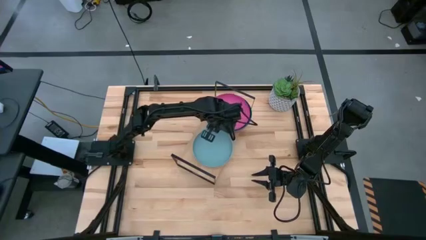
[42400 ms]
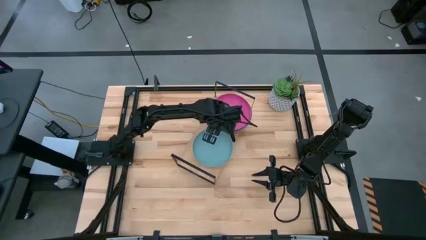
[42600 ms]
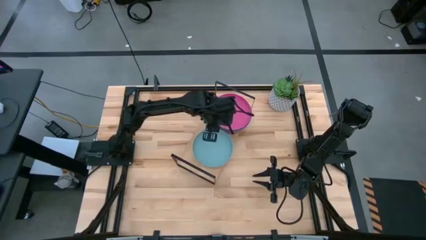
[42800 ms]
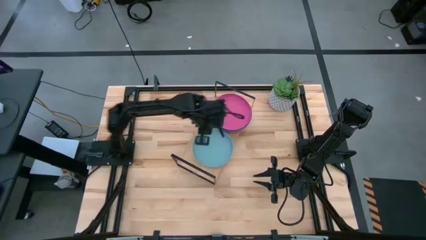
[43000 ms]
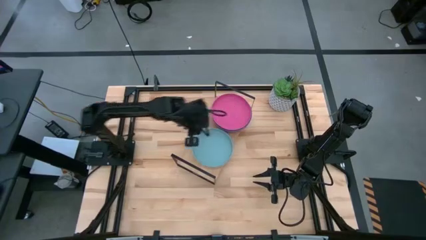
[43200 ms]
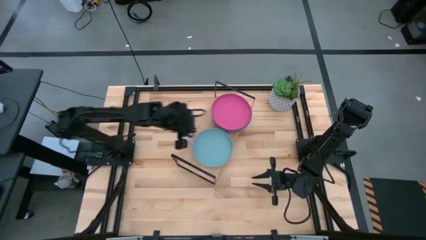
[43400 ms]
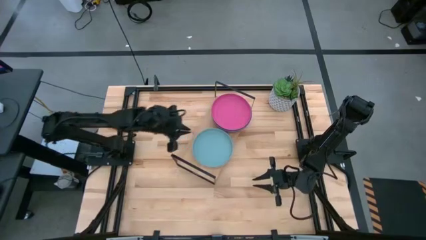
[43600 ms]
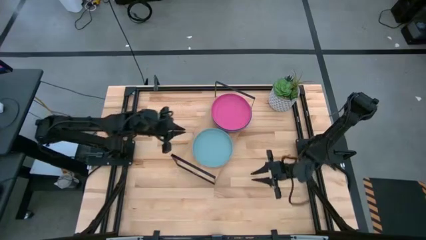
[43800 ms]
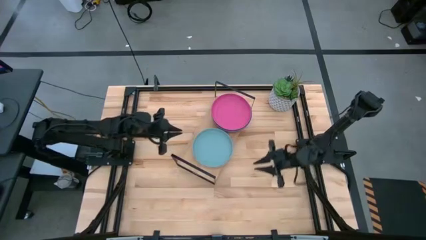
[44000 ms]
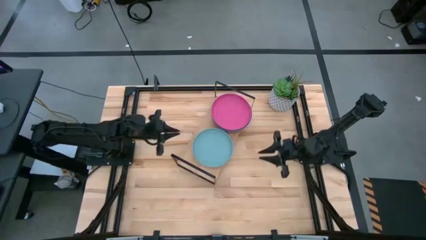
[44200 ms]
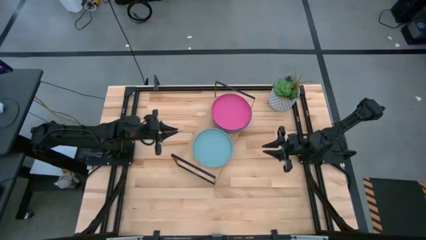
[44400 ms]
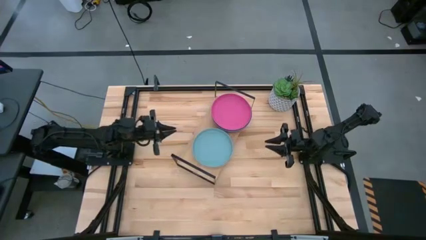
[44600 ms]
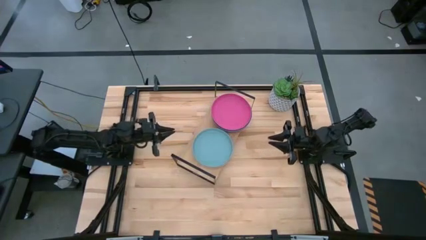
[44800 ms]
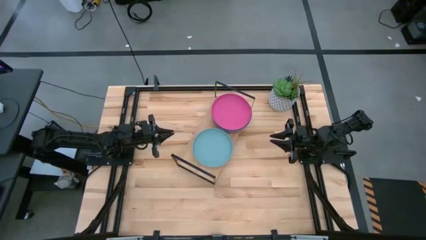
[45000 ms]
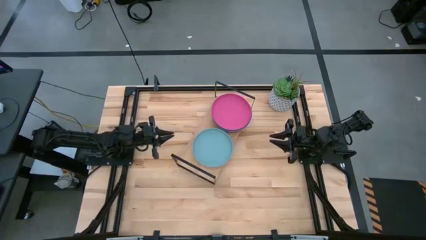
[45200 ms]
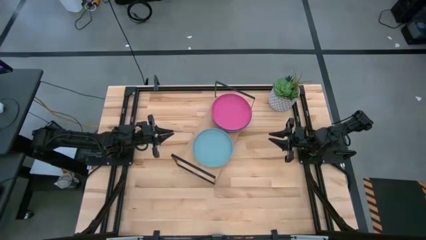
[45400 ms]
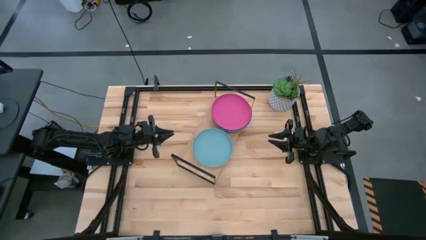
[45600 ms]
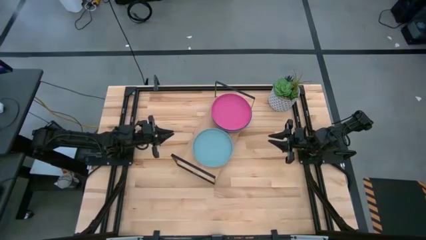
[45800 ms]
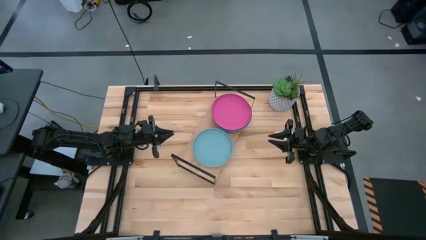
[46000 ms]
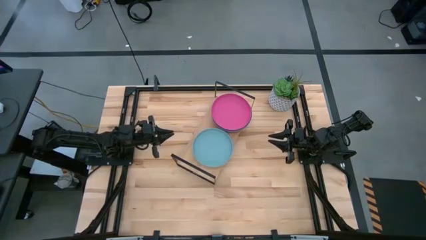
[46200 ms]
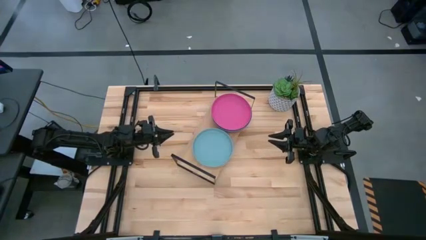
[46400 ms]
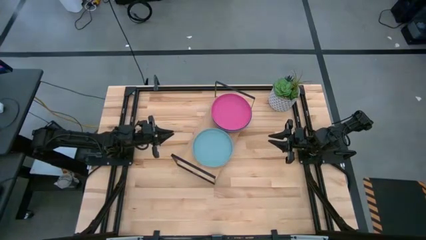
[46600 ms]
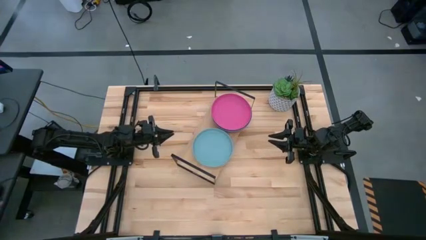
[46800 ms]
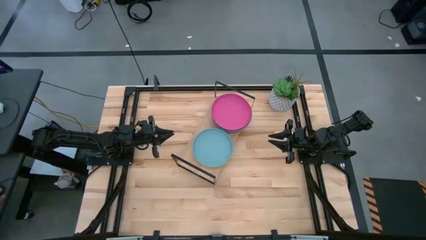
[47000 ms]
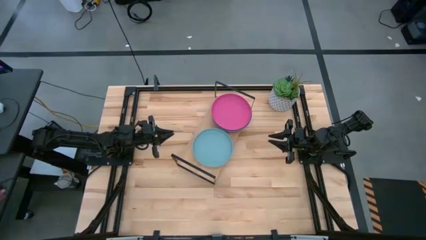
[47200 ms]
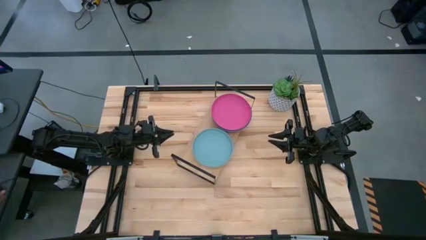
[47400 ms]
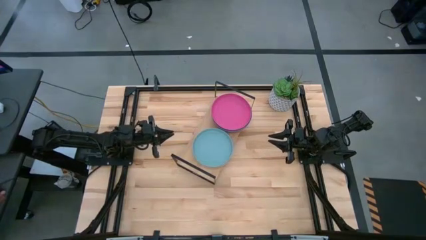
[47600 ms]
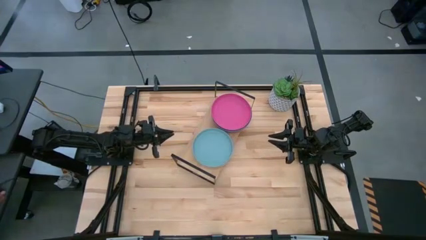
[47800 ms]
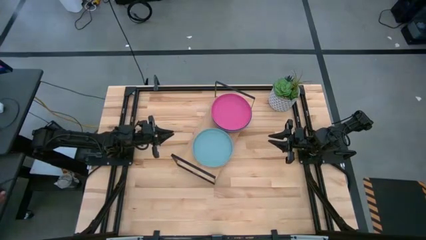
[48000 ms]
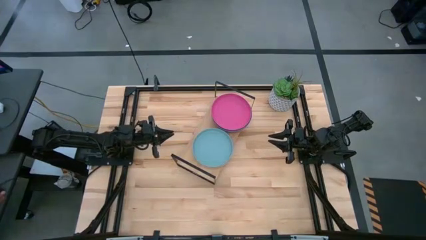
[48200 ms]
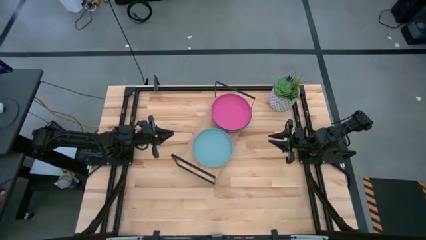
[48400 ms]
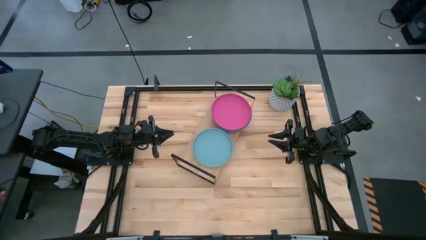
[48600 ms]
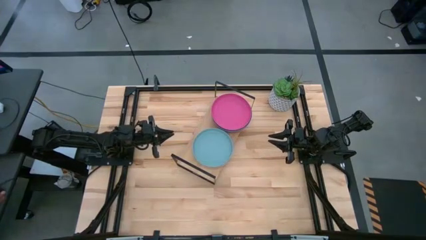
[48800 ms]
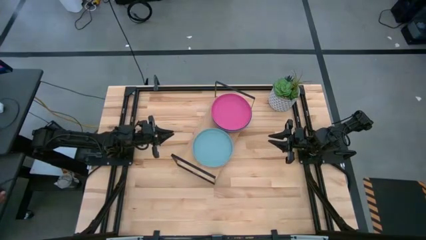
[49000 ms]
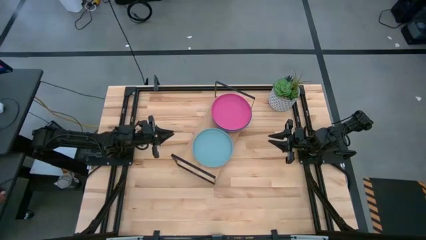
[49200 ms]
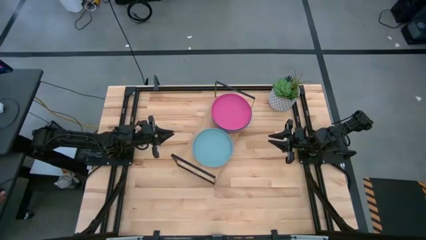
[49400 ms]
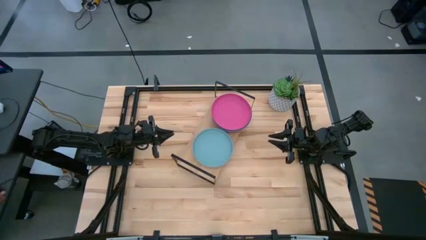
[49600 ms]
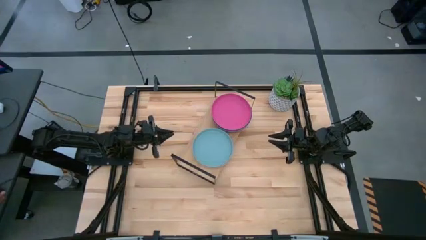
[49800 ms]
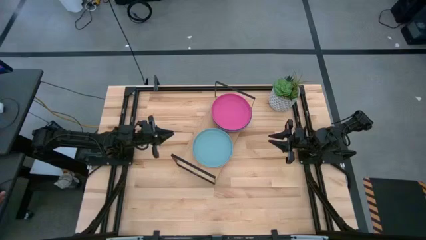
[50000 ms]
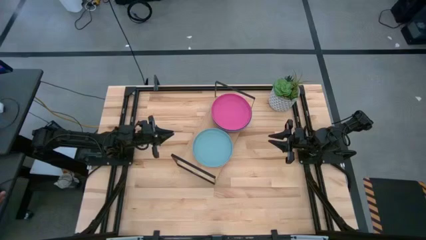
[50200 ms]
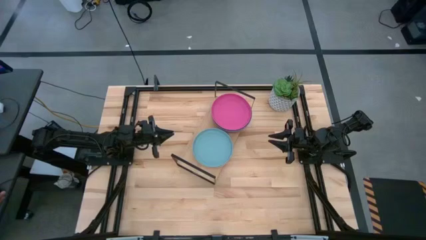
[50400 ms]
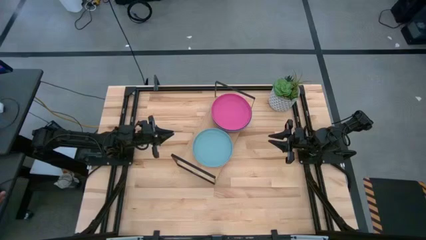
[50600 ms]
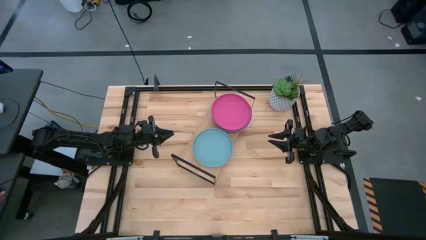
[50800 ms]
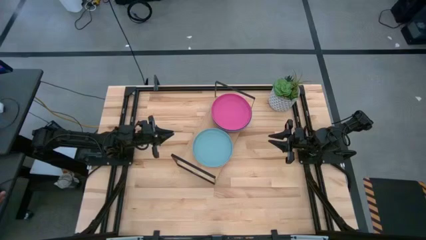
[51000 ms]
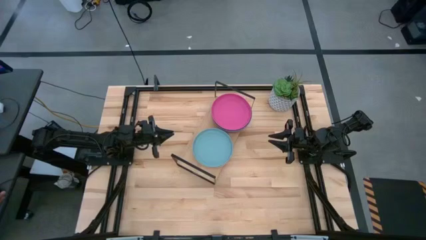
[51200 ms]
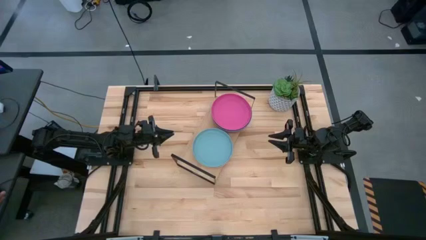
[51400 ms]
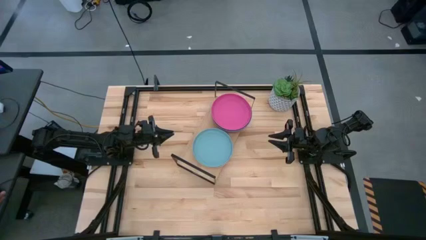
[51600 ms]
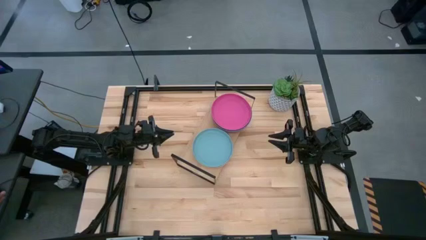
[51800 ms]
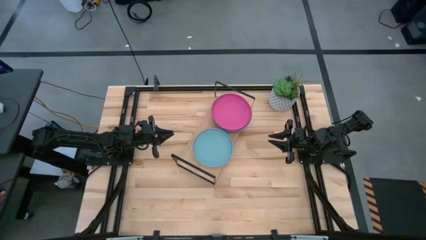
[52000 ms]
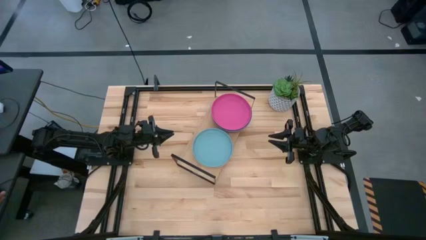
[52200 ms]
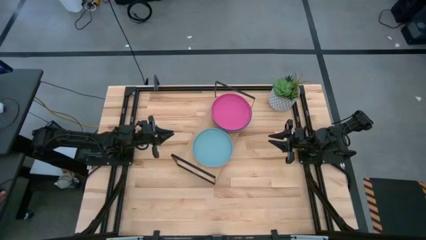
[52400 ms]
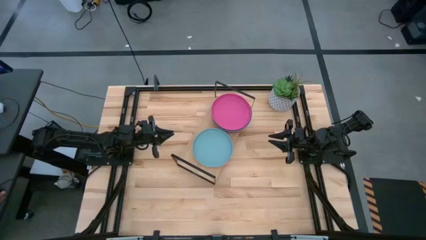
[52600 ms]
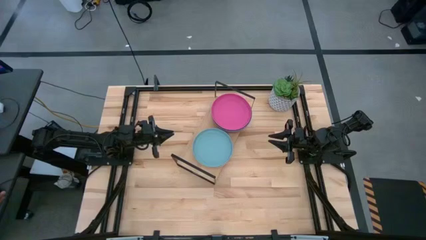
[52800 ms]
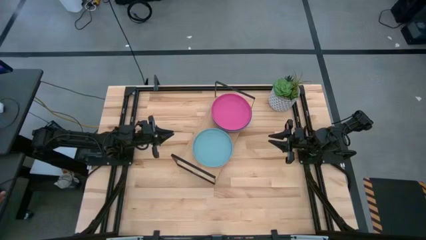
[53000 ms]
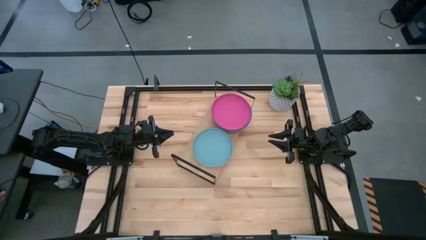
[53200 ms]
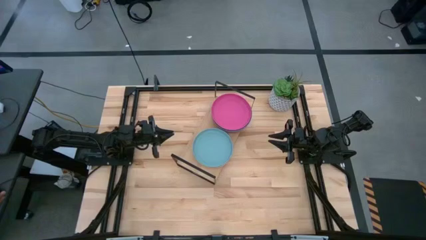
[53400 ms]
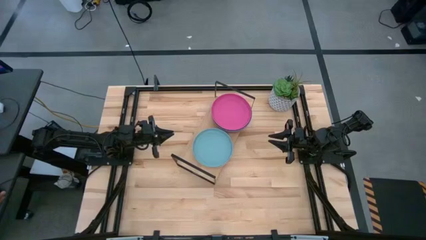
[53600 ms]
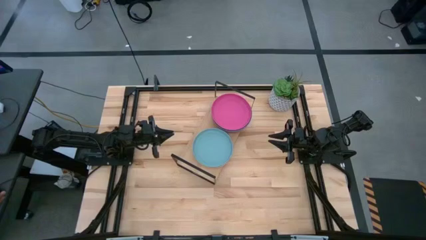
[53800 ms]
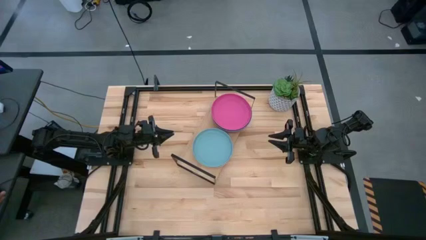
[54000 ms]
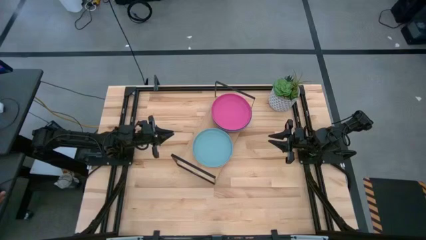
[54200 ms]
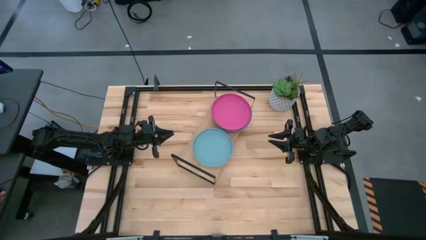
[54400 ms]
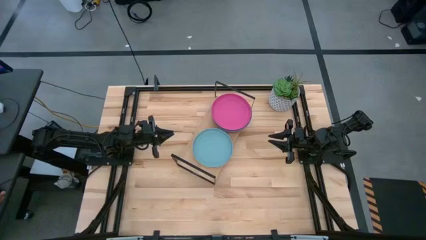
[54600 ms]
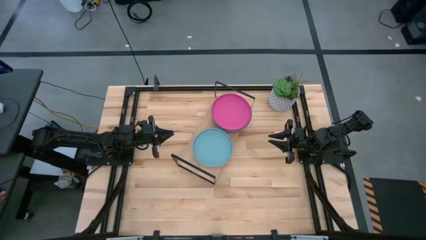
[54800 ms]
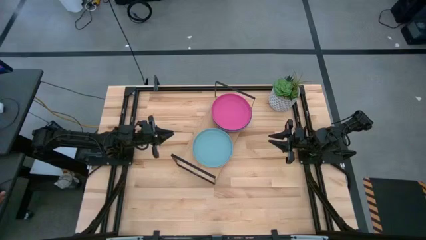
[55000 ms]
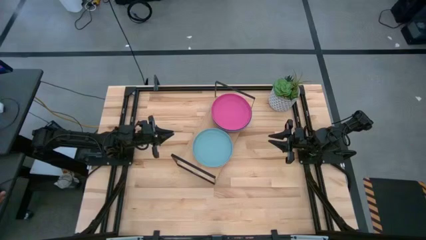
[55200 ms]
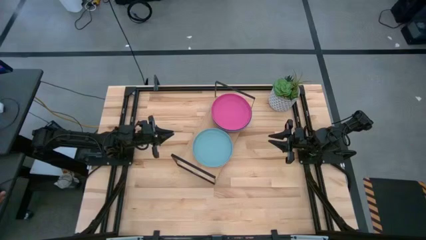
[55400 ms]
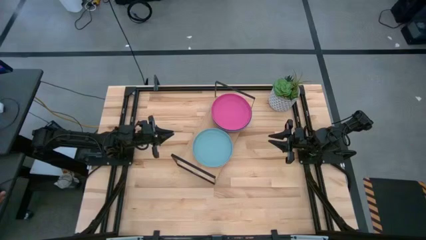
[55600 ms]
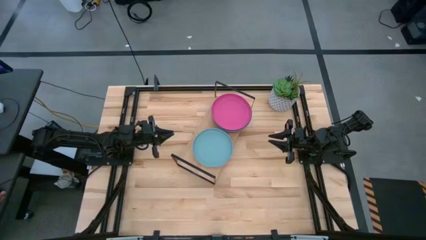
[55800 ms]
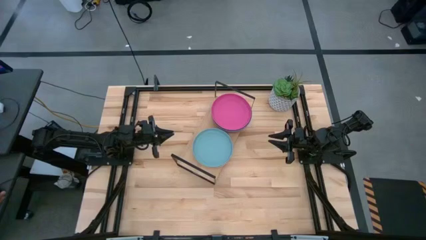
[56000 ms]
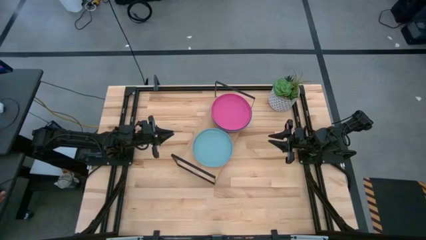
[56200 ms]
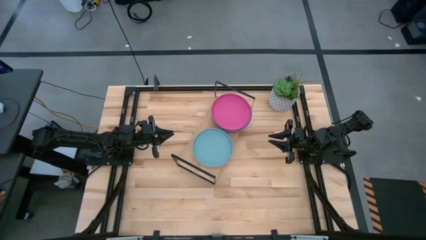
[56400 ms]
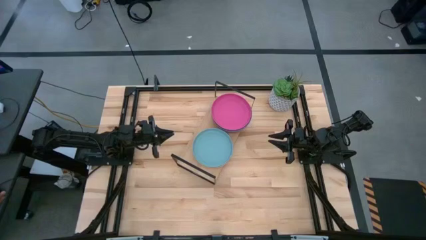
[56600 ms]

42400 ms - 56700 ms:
Task: Place and stack plates onto a shelf
Return to Home Position
